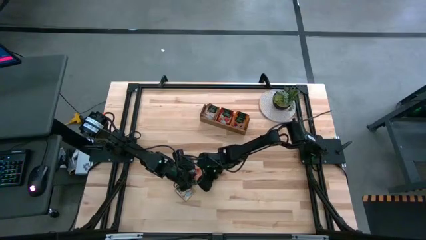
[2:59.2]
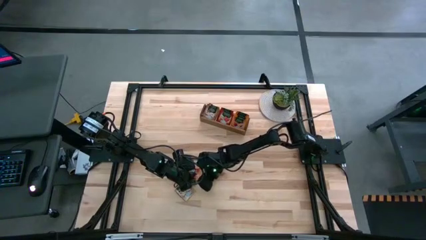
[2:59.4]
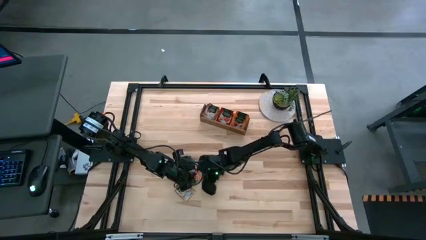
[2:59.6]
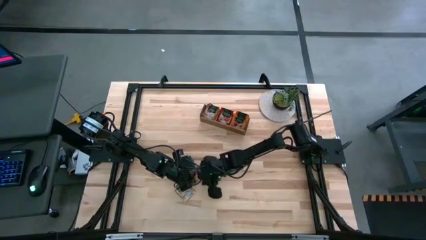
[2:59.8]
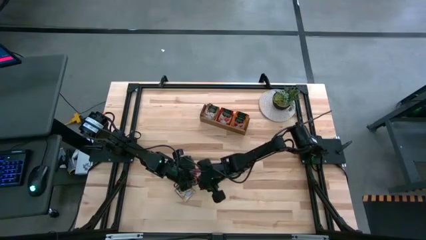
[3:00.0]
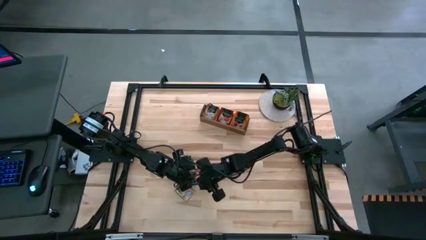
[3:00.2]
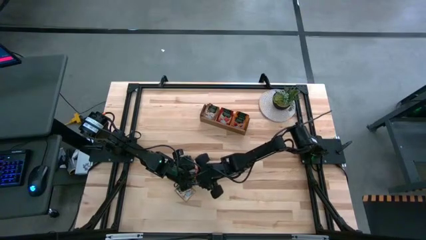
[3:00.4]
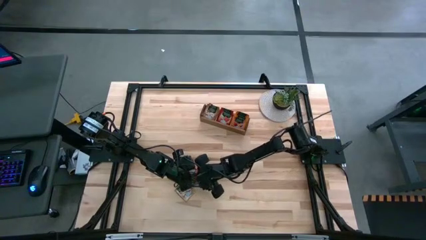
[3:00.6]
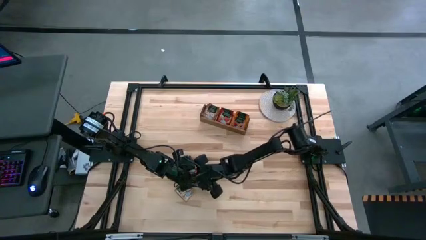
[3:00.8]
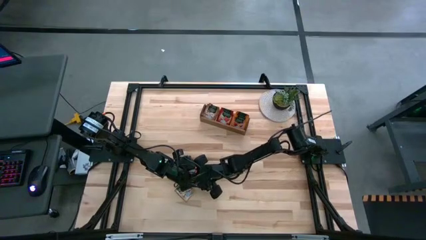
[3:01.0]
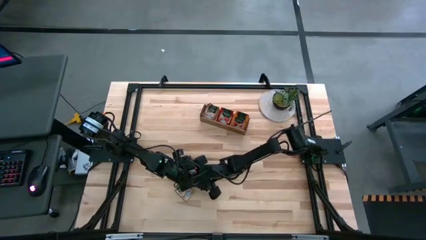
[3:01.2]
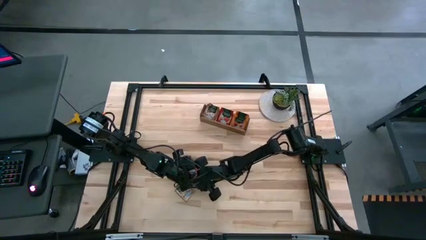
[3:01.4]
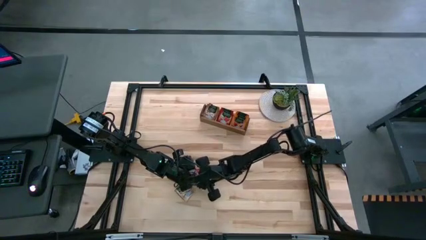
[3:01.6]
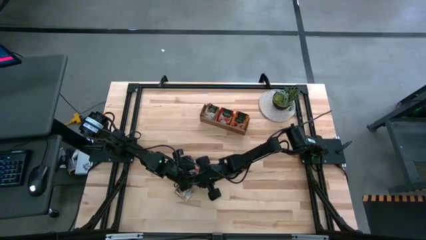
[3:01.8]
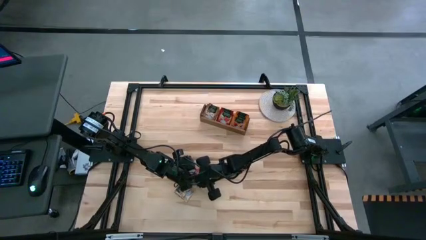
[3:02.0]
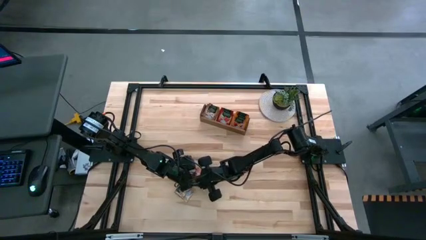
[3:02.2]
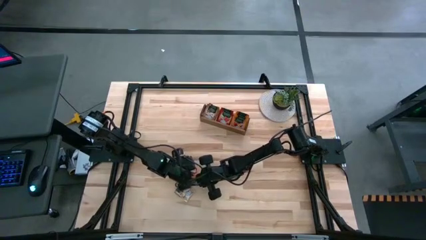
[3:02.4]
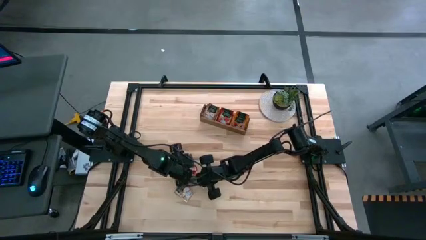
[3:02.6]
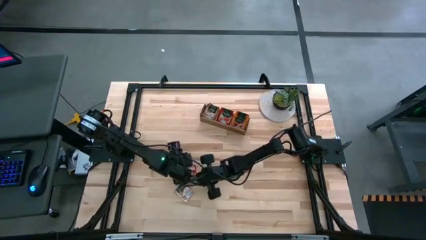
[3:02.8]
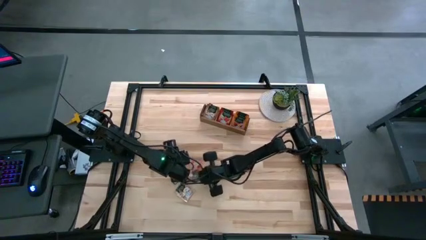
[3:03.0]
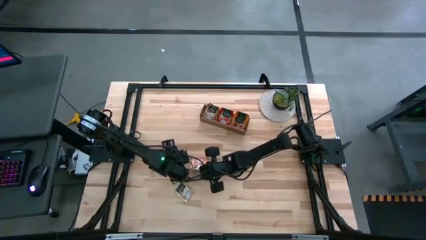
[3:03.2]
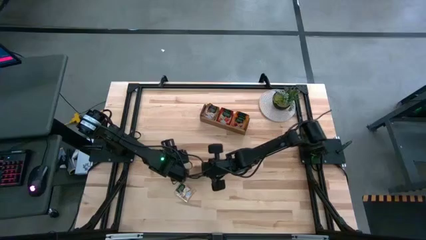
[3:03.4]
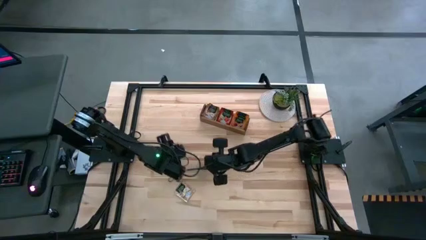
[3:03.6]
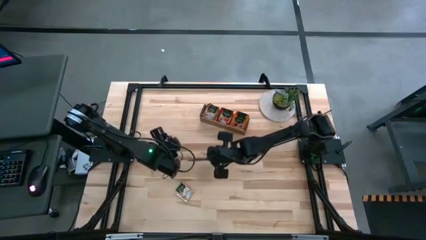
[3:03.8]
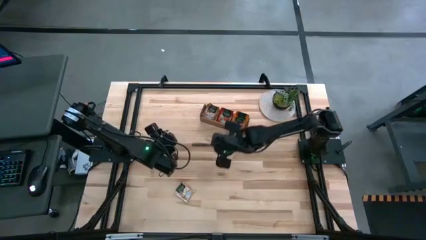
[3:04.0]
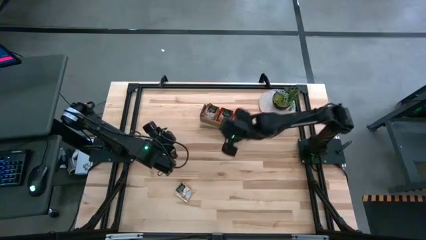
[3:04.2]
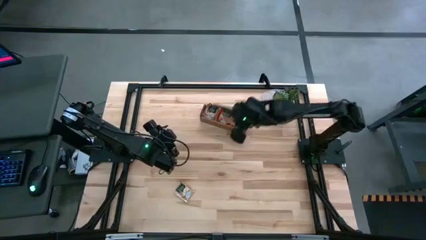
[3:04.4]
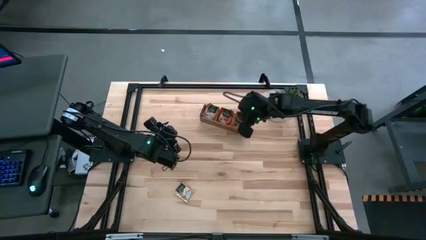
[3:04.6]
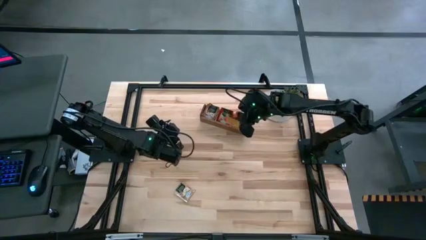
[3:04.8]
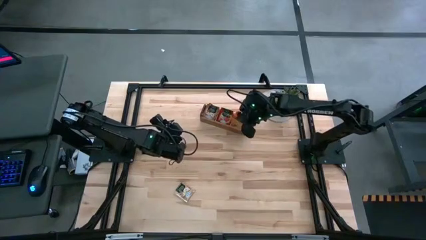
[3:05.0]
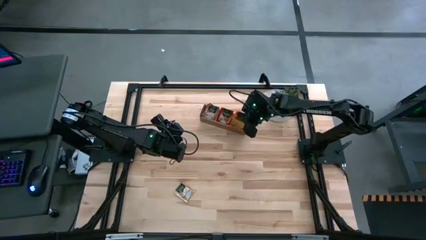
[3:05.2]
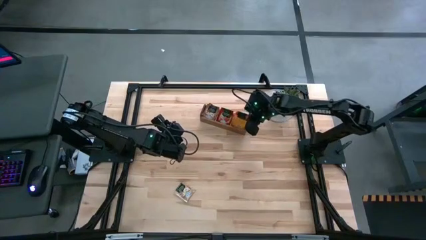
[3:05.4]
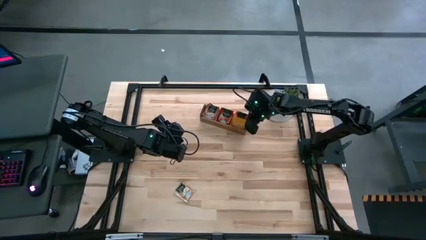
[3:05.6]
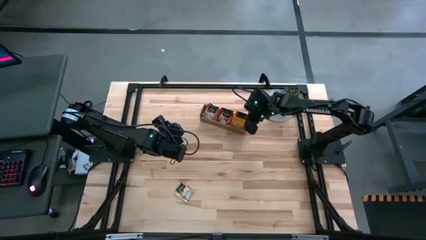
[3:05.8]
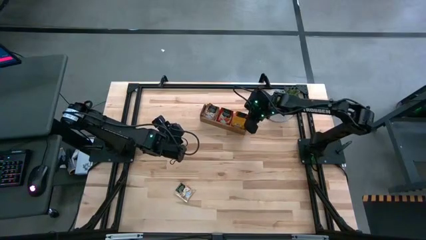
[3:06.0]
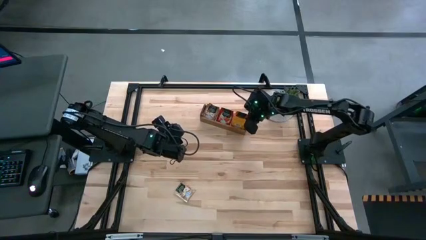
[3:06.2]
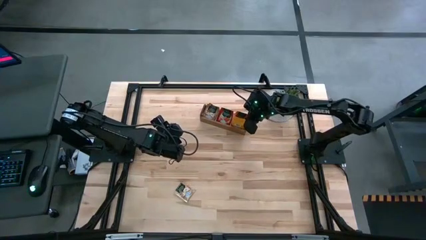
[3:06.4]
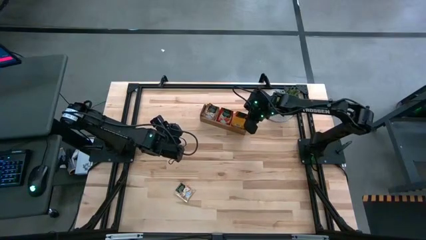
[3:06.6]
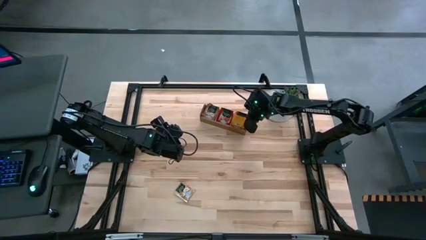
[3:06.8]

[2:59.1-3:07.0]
Task: Pick & Place Tea
Put the orange tea bag into the right section of the wooden organizer

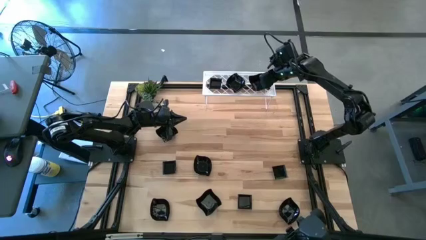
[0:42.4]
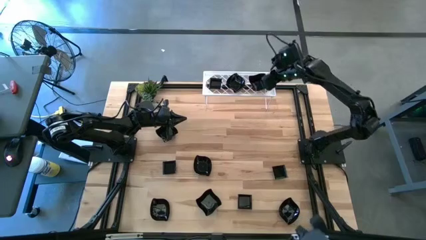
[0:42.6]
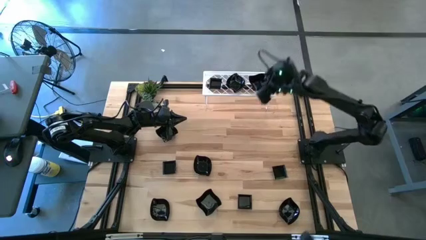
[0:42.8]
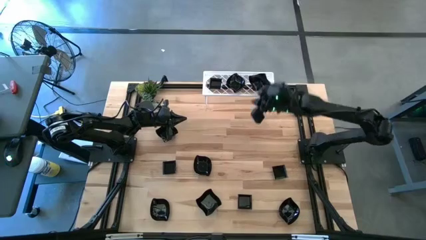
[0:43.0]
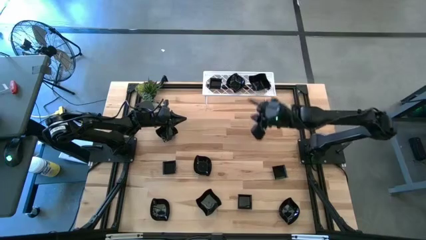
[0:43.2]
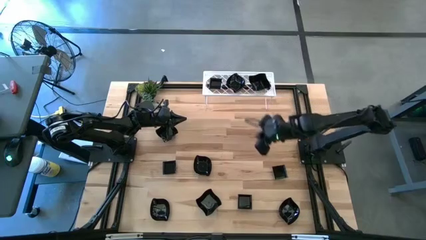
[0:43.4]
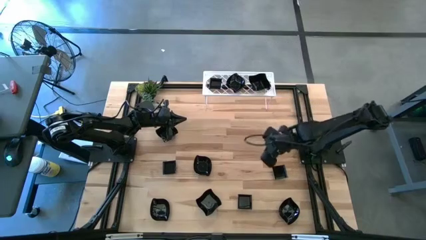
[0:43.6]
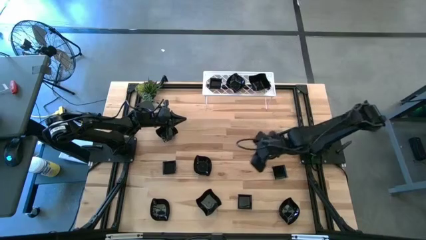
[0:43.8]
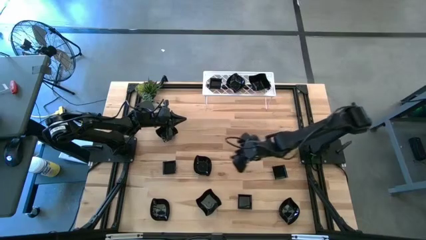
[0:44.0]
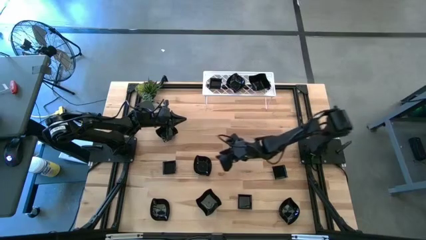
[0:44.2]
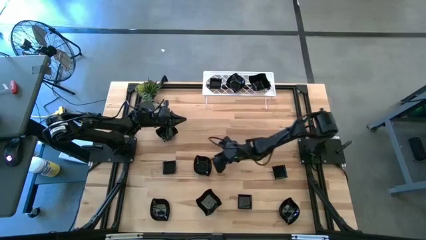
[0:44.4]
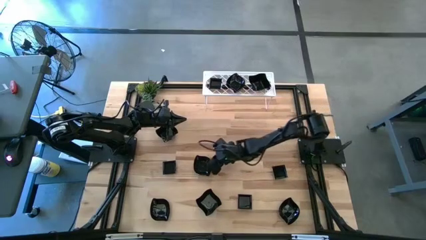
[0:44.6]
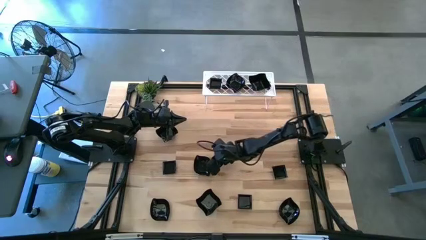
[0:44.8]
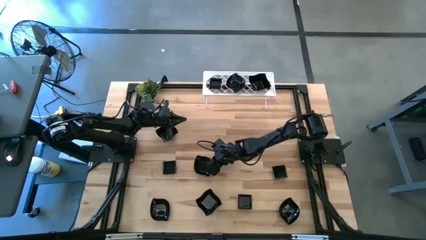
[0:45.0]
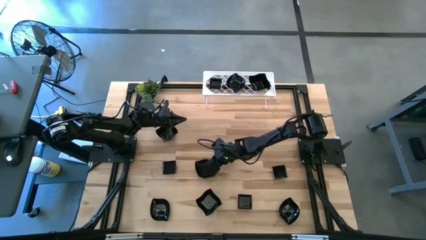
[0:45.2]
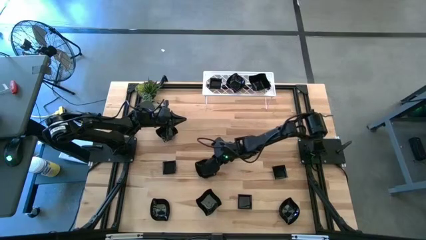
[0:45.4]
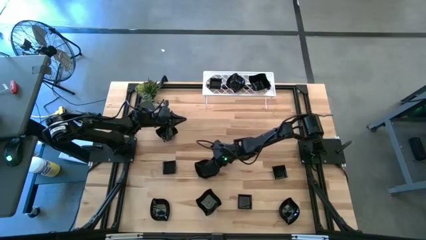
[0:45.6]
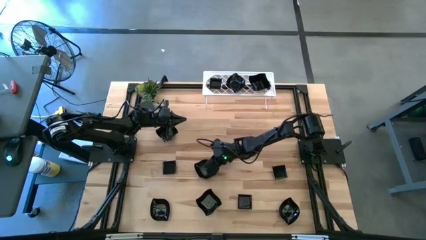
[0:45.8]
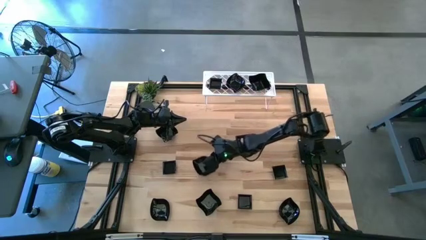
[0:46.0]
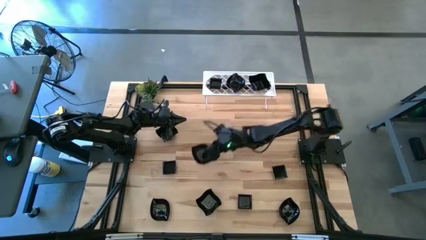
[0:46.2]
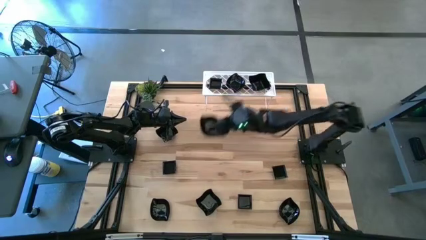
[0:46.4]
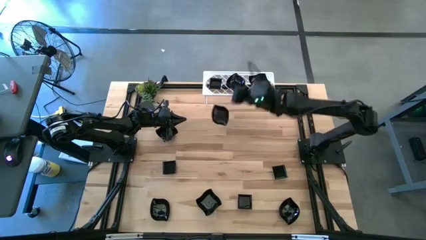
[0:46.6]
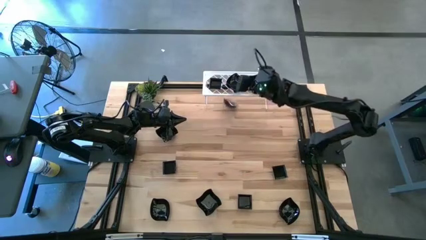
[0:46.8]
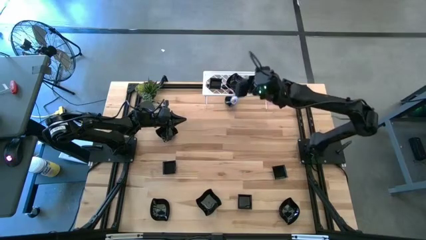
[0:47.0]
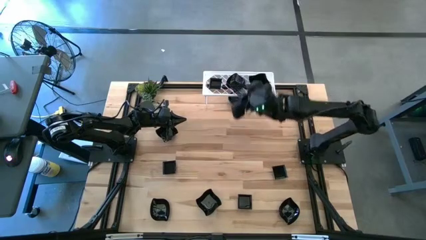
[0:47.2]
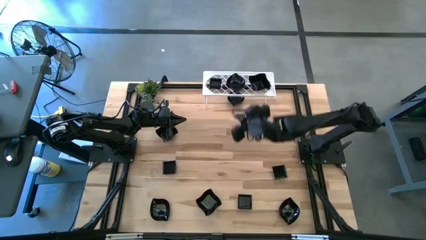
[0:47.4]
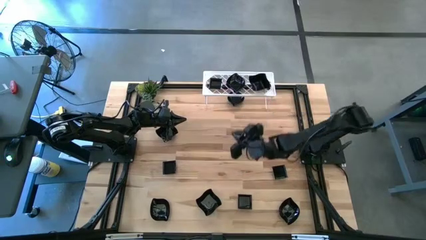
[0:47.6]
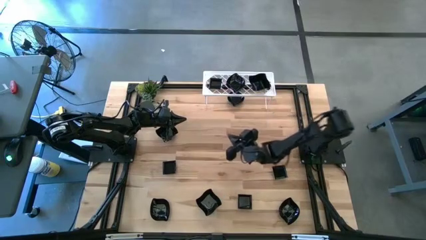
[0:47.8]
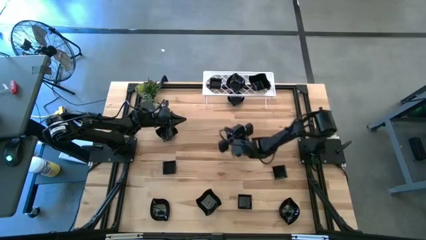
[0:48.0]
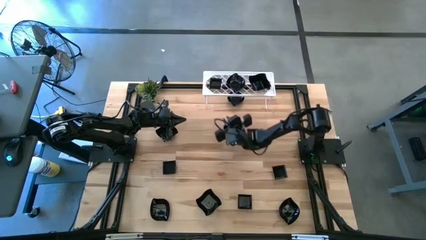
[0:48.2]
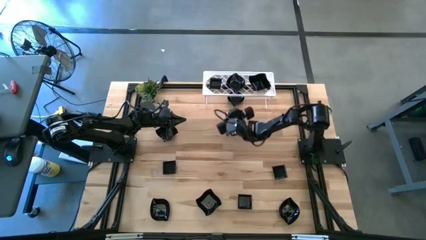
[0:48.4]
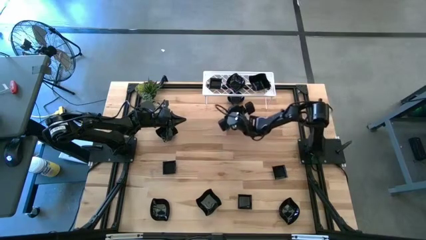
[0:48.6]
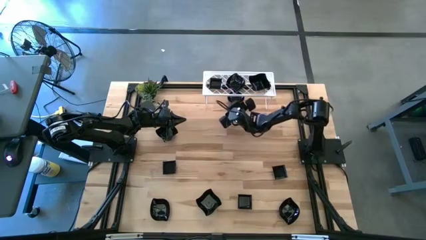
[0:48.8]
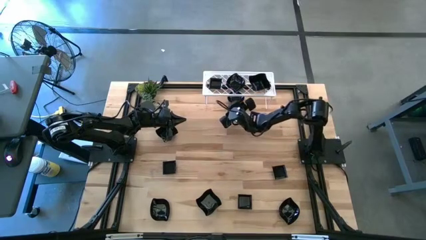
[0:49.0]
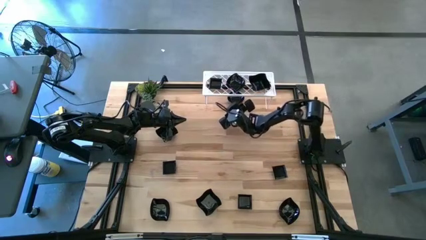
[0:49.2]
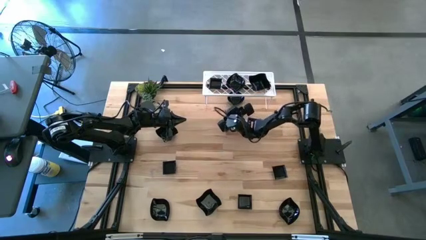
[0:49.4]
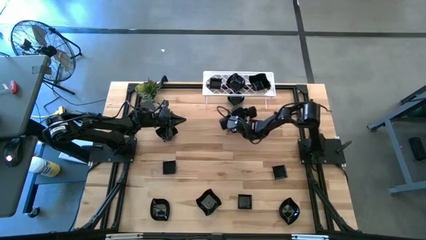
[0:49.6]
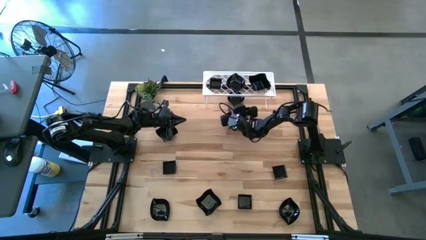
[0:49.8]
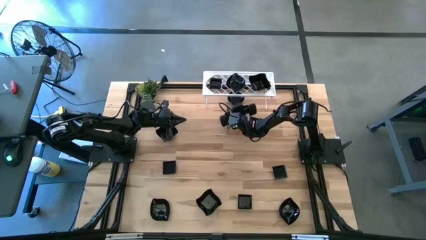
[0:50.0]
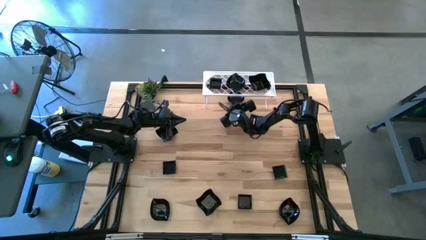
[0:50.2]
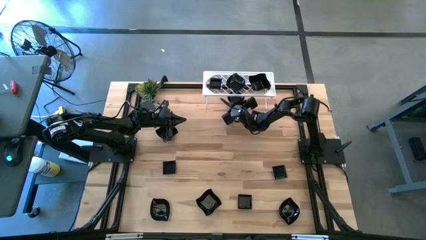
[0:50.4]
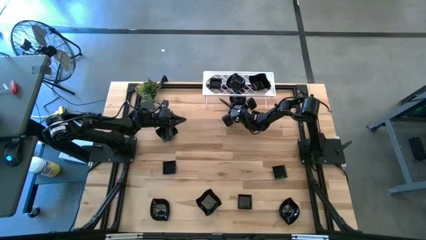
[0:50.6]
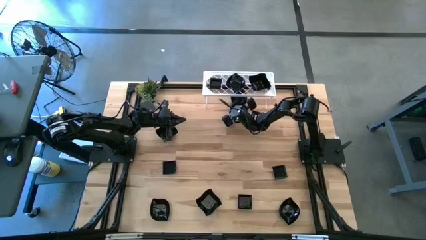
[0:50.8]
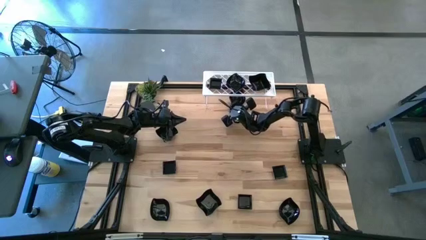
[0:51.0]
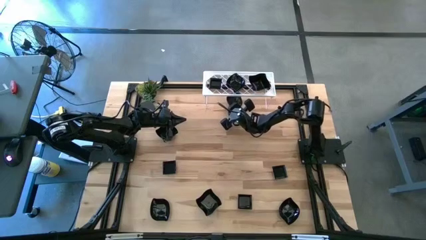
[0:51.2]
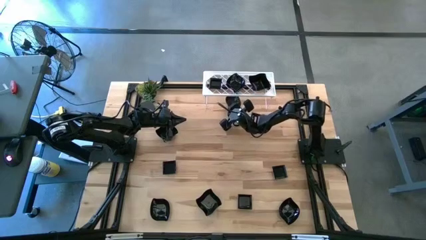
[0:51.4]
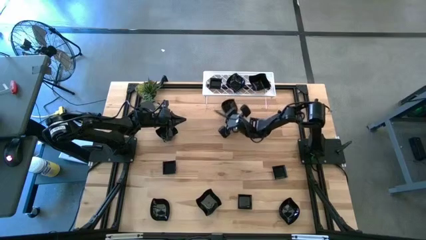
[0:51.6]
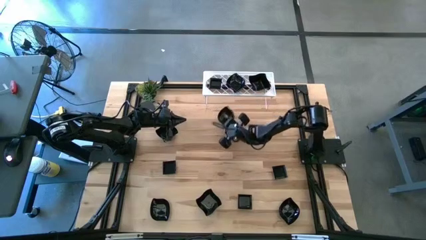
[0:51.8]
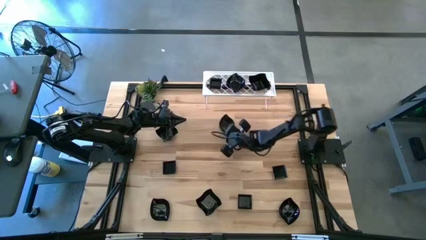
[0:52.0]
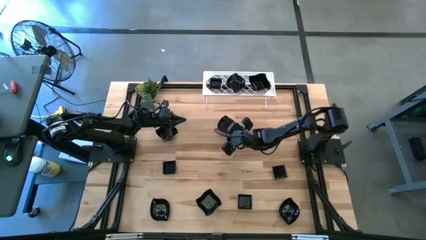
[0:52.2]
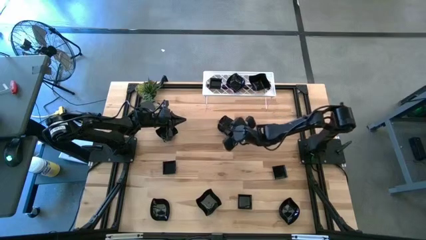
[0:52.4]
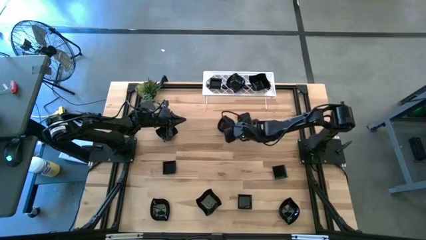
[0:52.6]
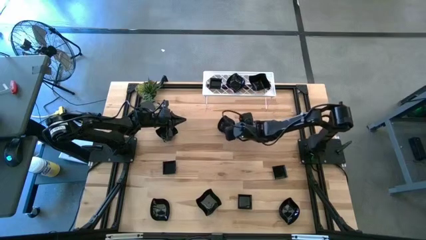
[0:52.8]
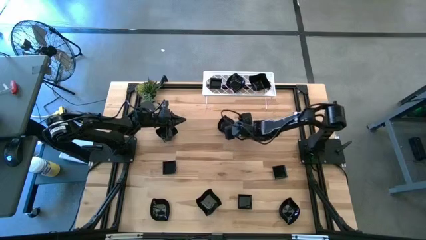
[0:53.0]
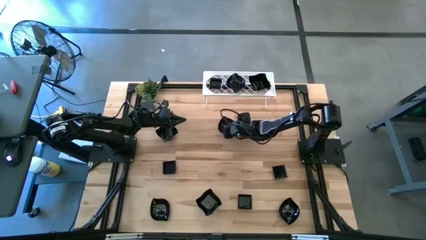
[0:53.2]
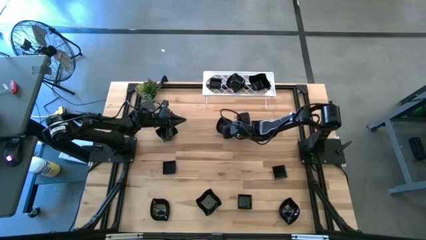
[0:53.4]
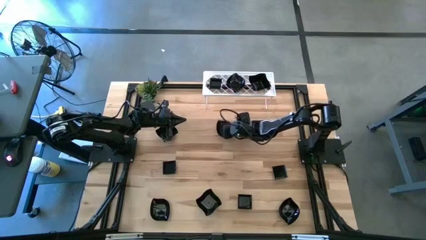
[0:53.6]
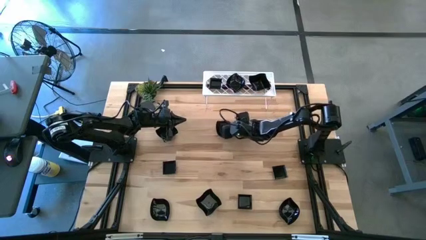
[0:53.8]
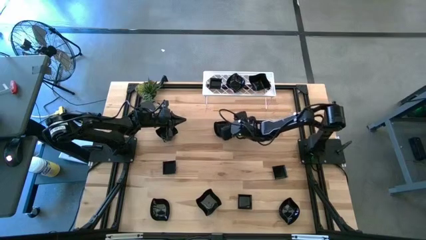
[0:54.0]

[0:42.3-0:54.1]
Task: Pick & Place Mini shaped plates
Stack the leaf shaped plate on top of the leaf shaped plate on the shelf
